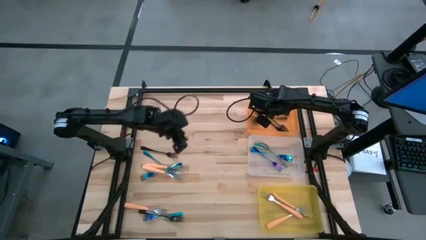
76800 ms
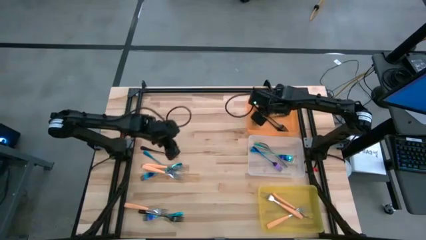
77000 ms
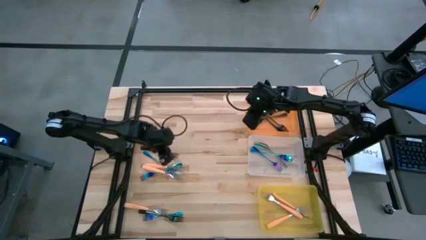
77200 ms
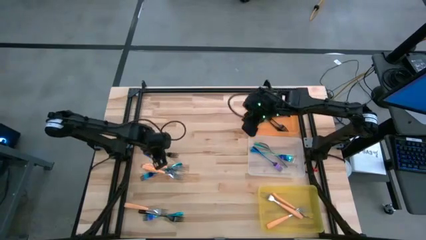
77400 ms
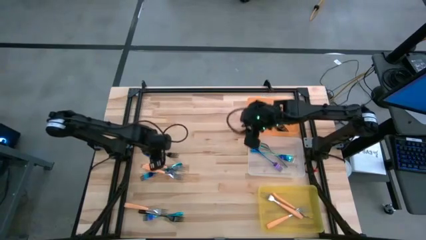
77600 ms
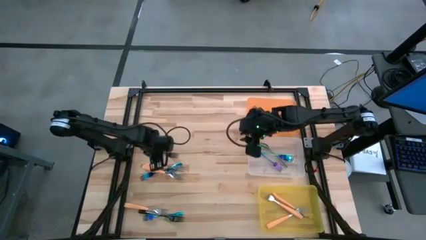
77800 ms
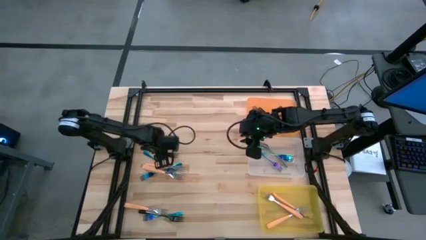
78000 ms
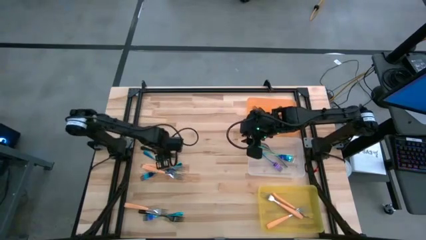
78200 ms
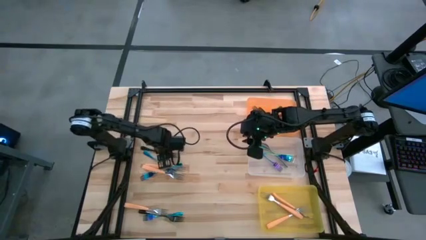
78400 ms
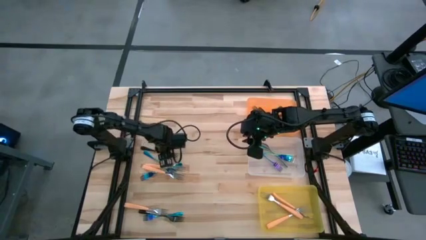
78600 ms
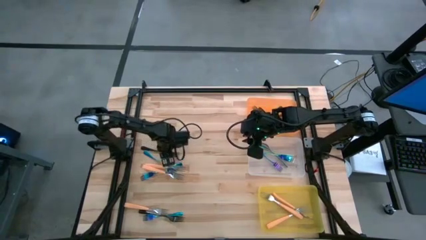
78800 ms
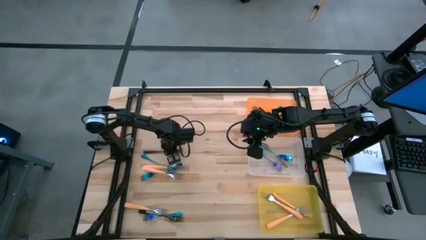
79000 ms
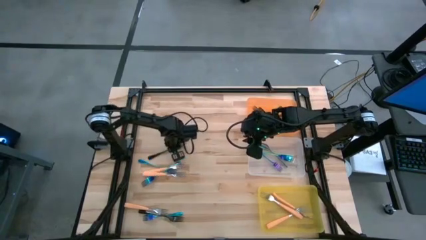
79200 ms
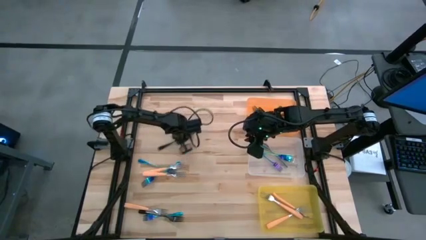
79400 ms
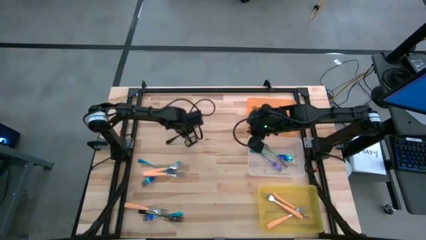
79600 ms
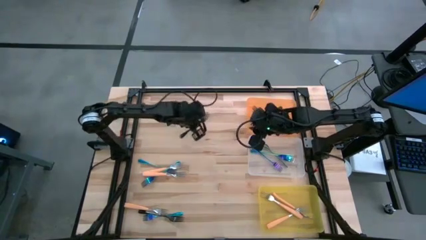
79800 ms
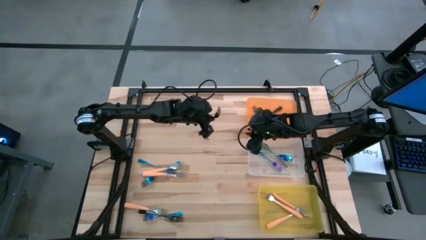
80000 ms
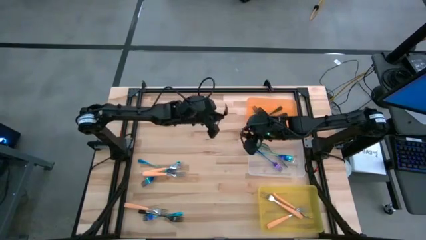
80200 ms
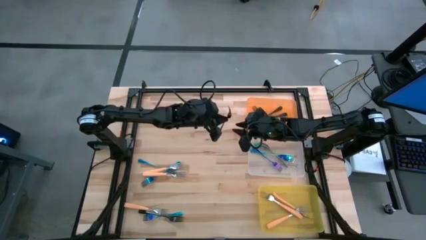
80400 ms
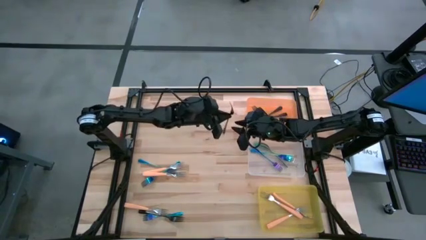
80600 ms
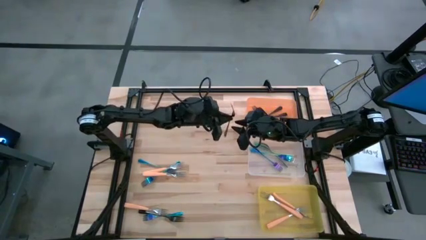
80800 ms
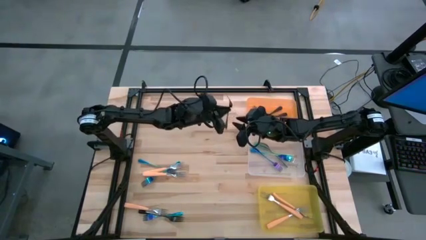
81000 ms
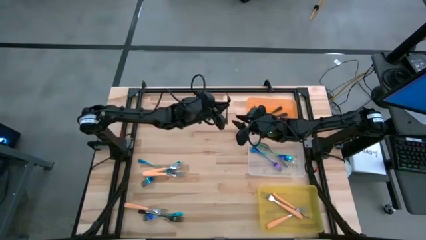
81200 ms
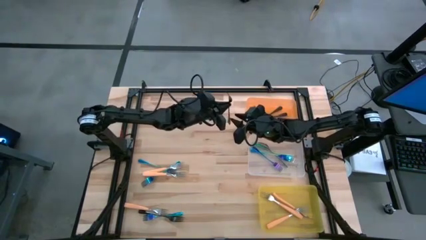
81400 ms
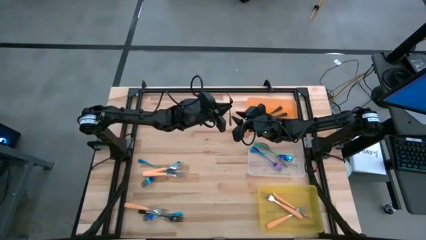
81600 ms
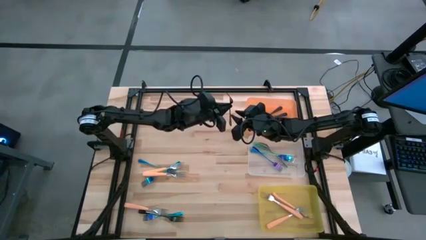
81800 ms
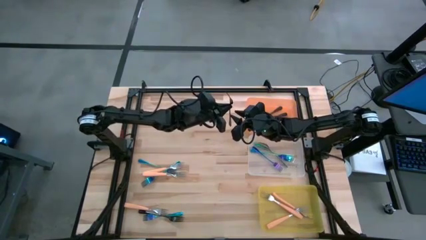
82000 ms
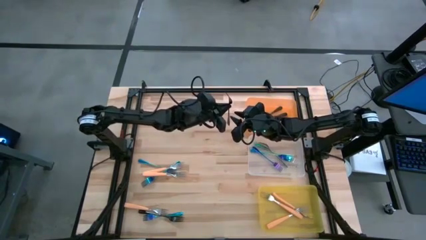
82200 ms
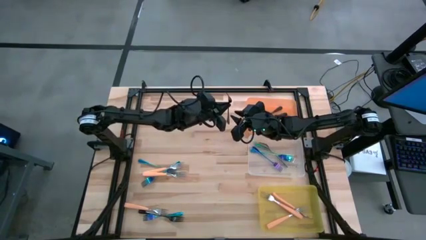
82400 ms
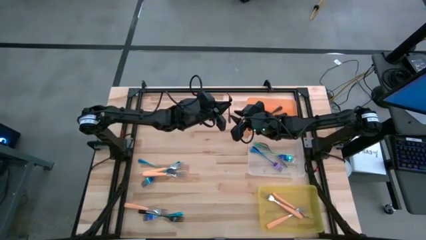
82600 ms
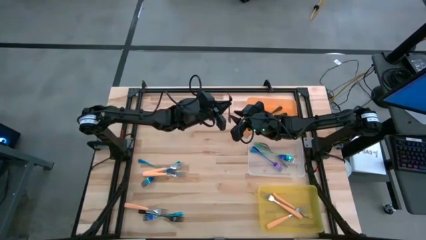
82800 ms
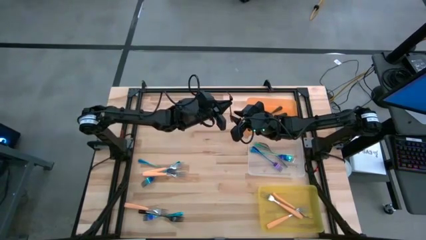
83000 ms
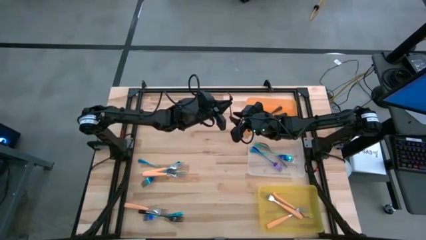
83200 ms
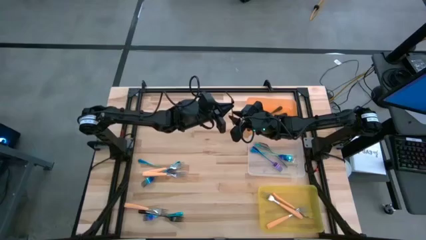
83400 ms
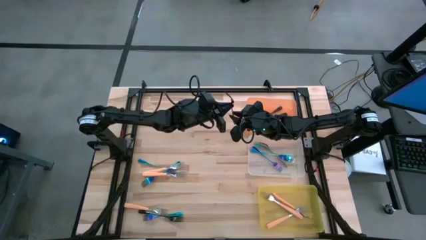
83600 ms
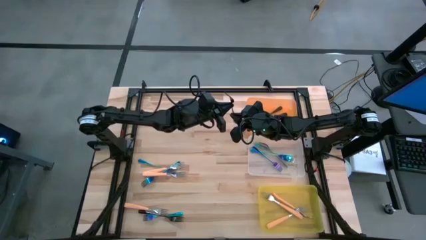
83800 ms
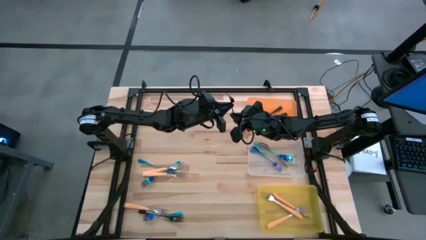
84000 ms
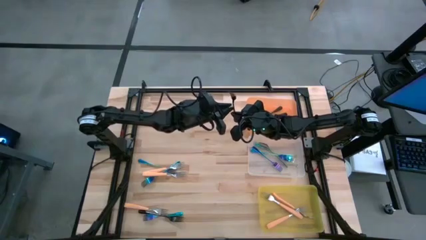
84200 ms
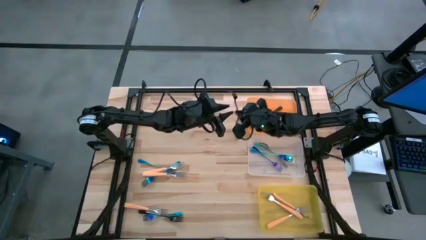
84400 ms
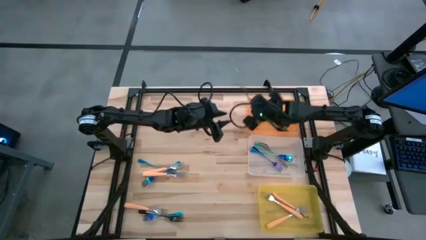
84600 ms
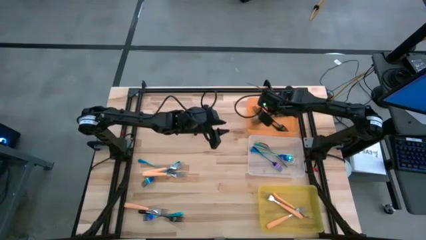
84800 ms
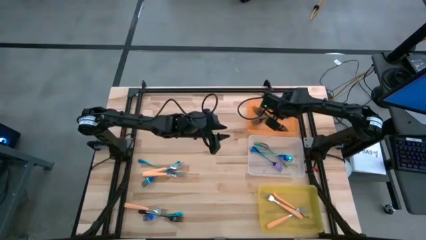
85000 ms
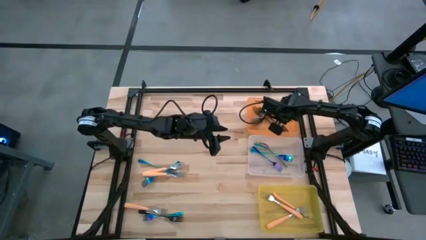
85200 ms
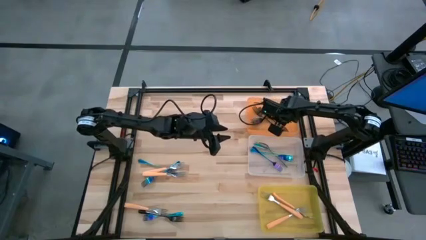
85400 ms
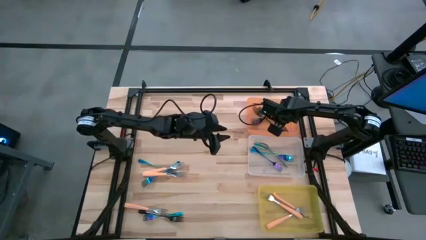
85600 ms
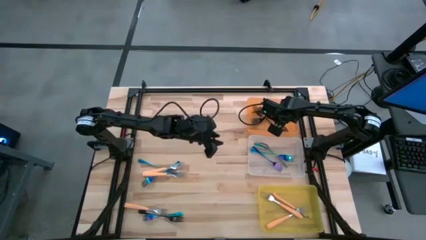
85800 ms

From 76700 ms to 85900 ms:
Task: Sort silverware by color (type)
Put the black fork into the orange bin

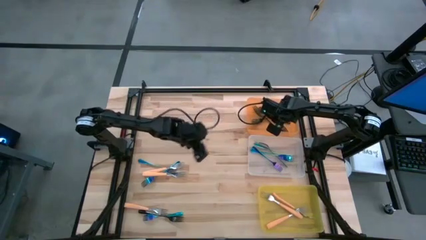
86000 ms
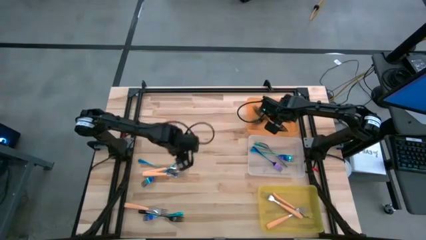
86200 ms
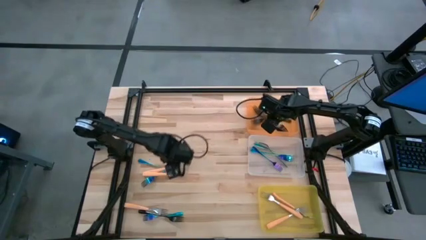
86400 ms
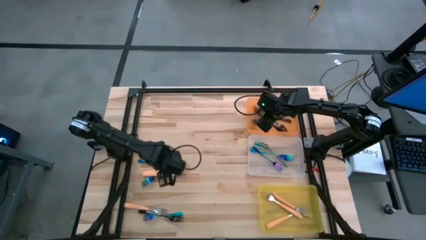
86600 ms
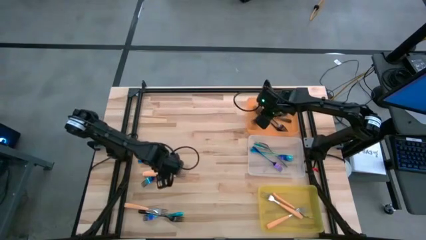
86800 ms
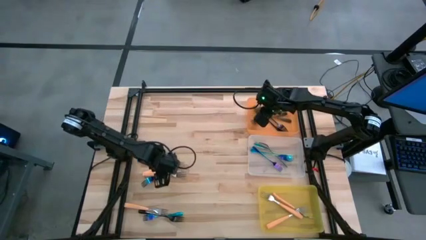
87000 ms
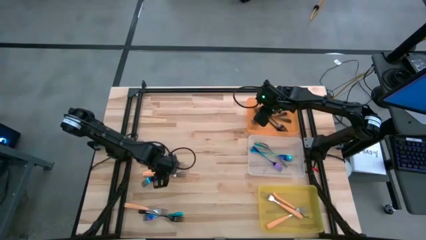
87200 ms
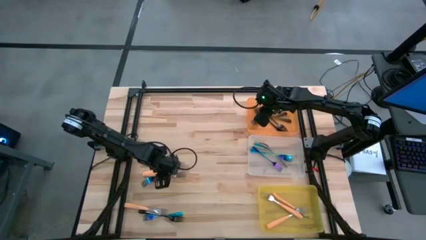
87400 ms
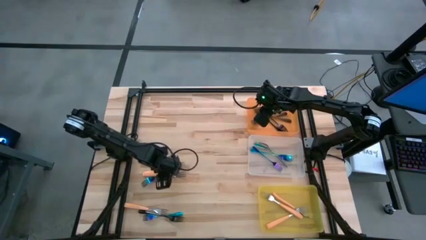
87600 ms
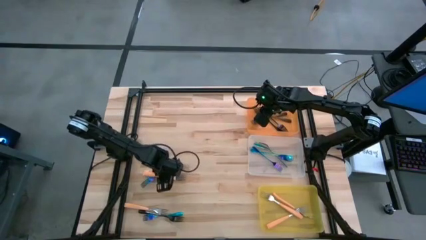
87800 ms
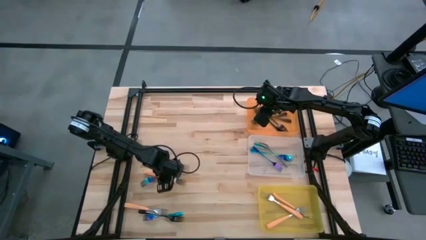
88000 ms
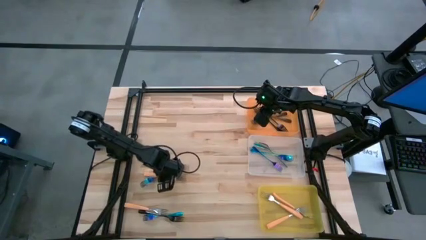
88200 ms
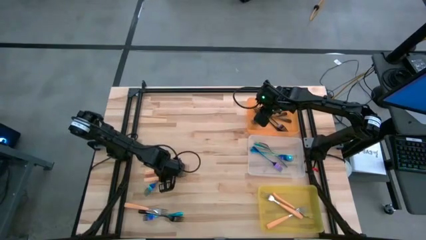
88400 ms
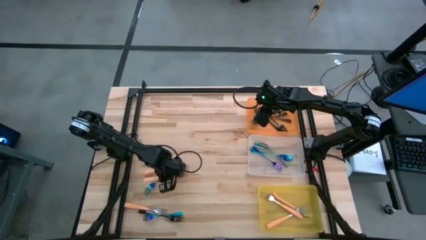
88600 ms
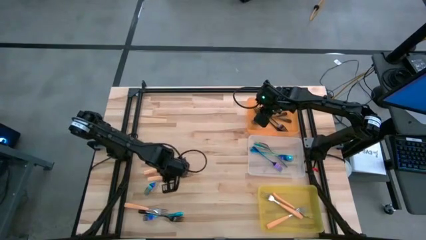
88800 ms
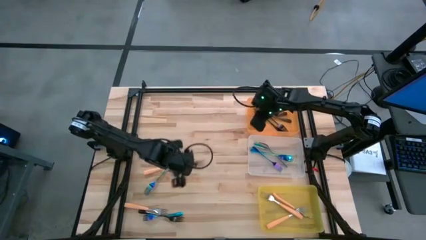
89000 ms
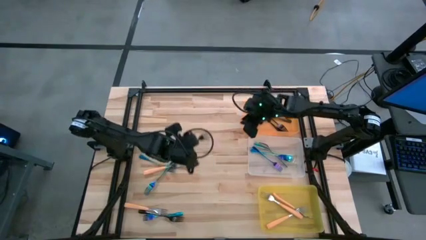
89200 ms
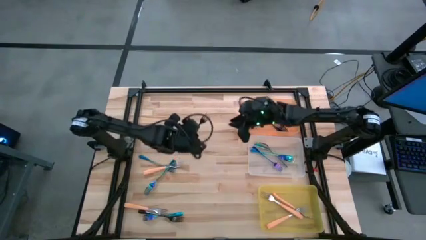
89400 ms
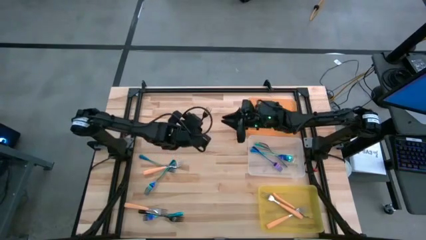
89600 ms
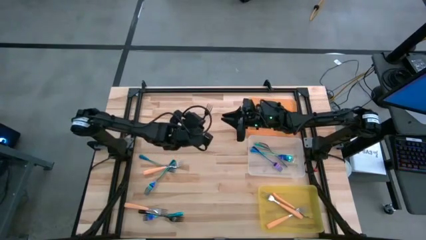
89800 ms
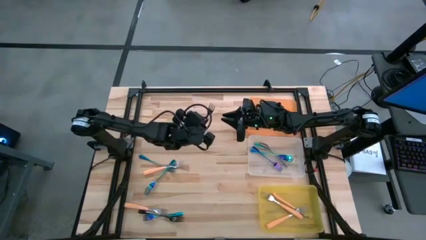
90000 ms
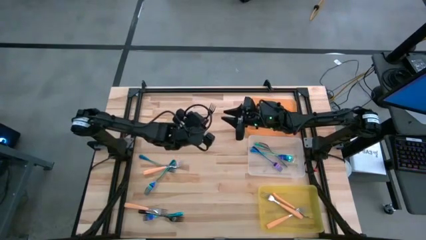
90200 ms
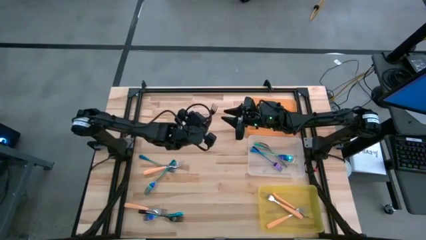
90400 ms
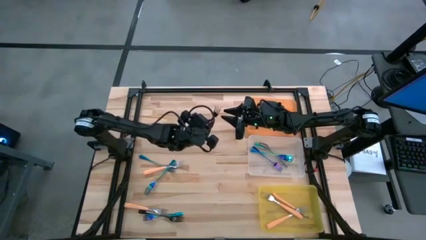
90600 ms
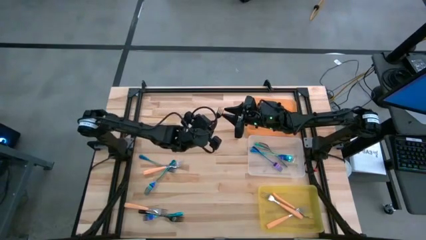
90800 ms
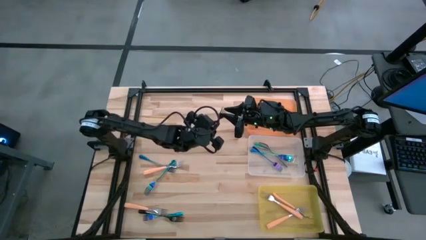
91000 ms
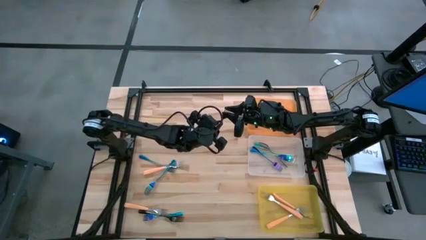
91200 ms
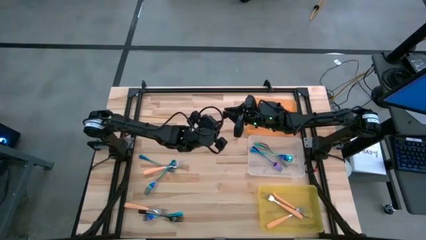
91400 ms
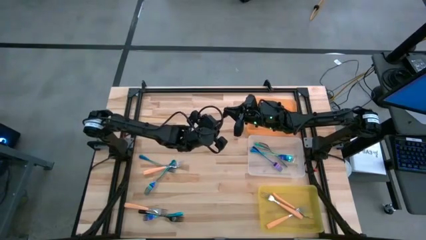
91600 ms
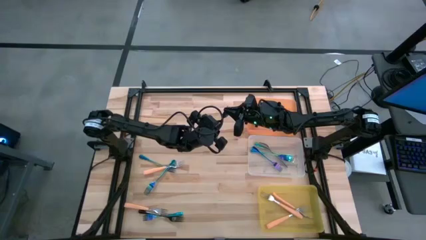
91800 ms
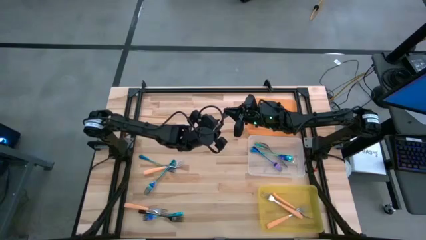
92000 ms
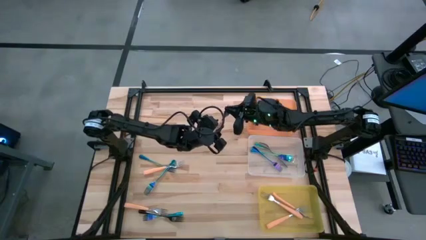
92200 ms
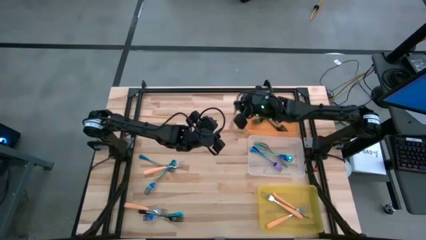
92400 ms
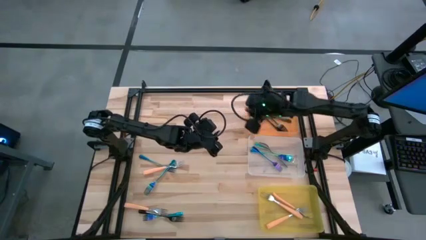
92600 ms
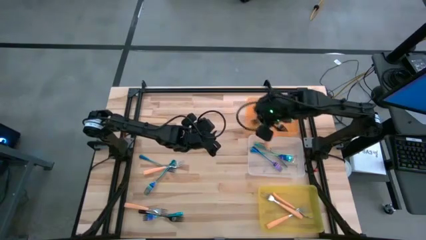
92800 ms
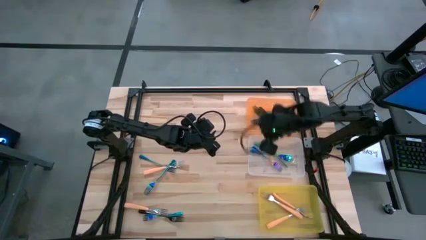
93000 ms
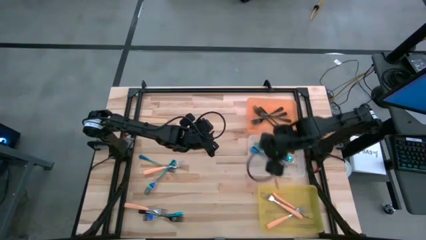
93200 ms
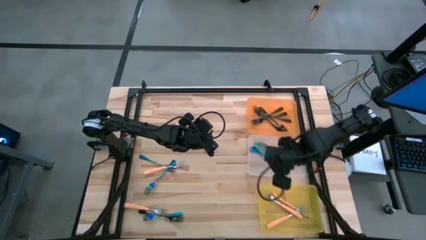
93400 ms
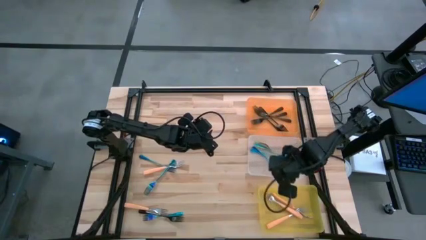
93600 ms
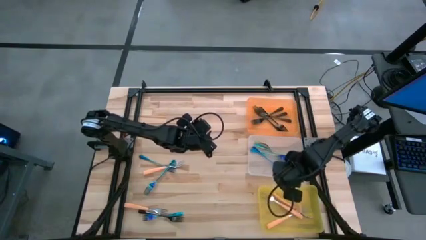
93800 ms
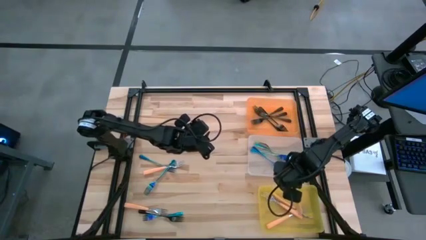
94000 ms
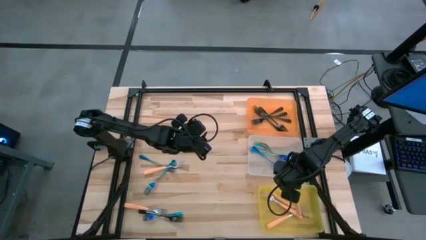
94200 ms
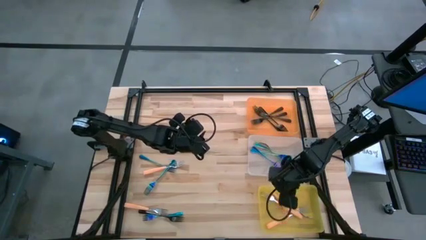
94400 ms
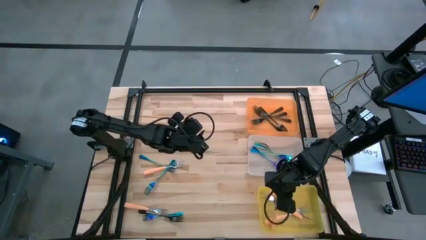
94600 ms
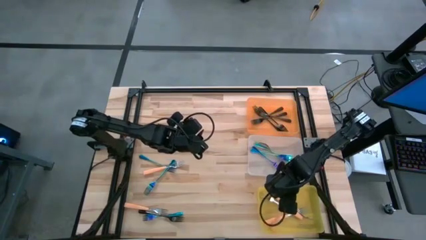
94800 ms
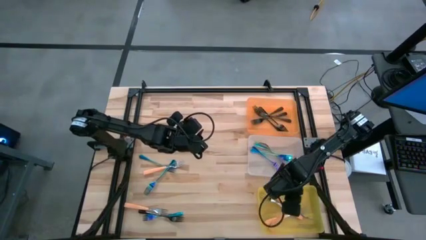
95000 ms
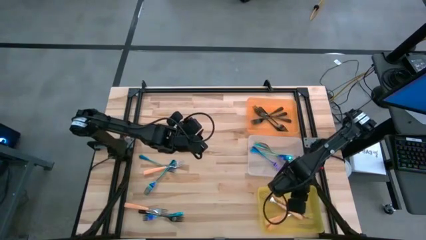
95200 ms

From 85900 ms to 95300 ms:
Put the orange fork into the yellow bin
